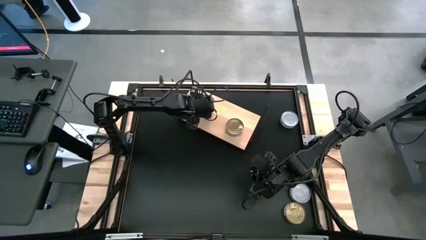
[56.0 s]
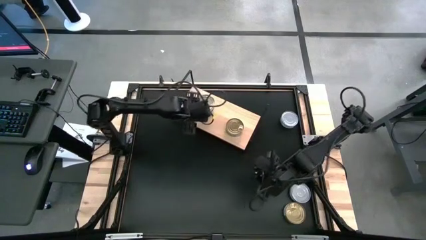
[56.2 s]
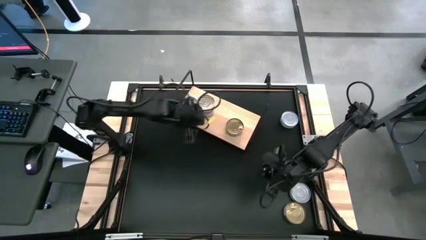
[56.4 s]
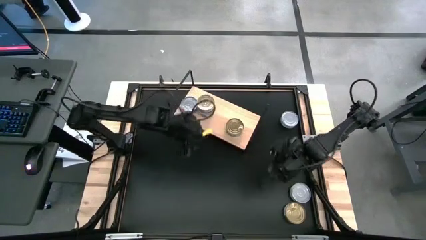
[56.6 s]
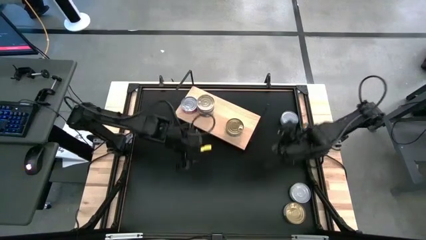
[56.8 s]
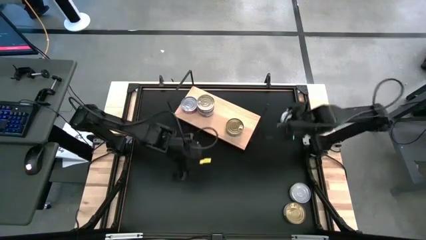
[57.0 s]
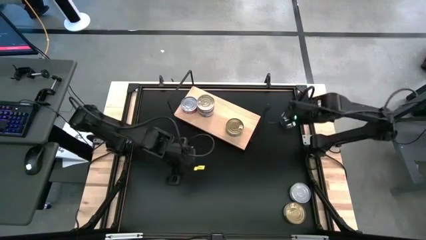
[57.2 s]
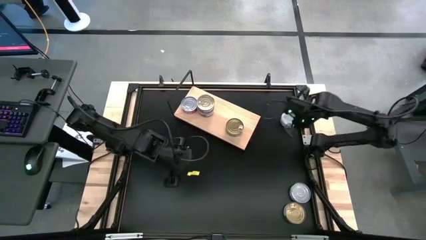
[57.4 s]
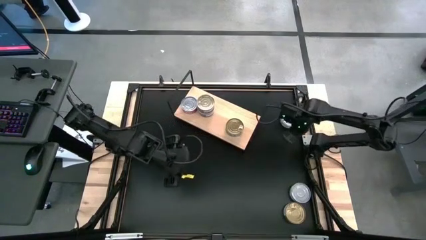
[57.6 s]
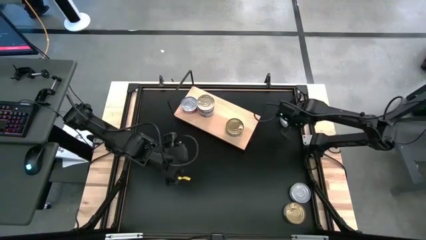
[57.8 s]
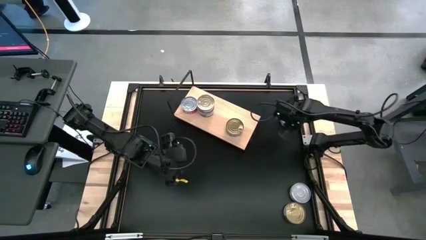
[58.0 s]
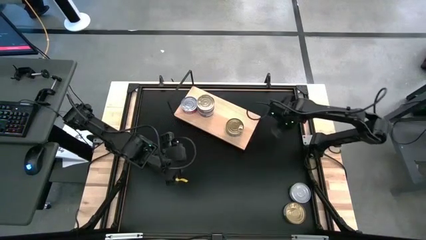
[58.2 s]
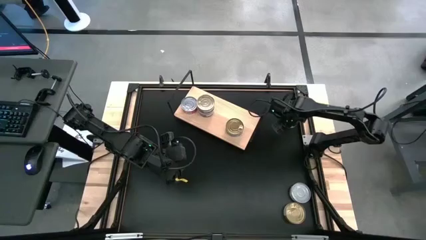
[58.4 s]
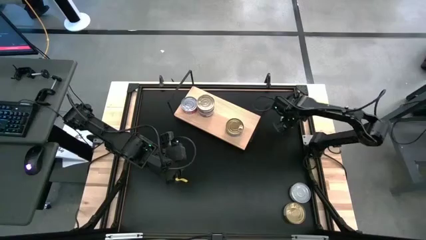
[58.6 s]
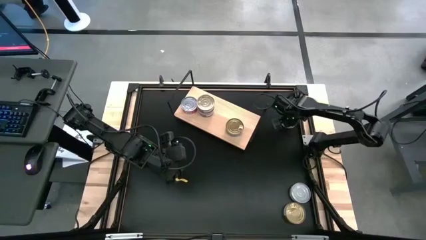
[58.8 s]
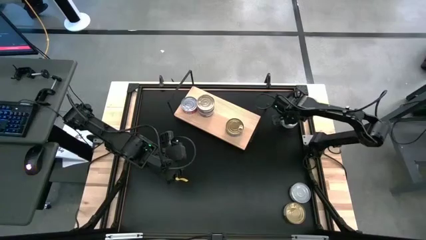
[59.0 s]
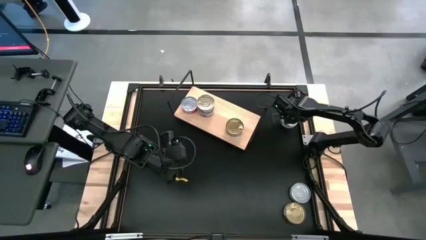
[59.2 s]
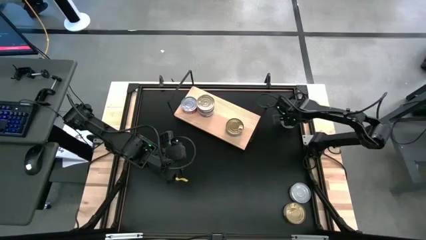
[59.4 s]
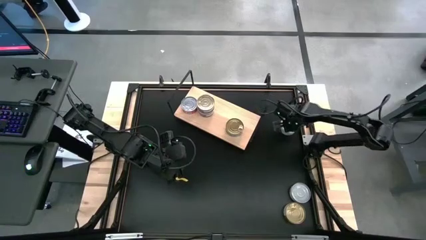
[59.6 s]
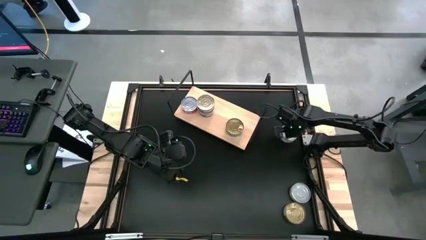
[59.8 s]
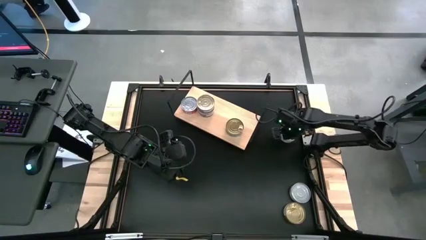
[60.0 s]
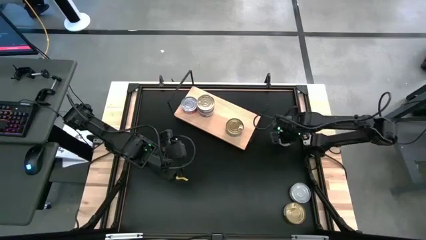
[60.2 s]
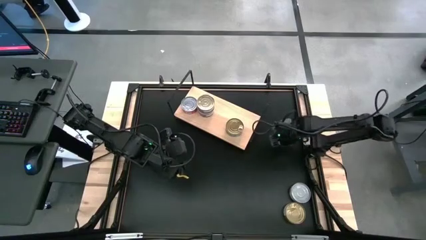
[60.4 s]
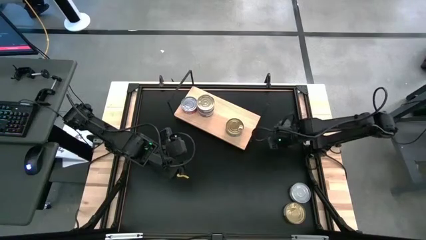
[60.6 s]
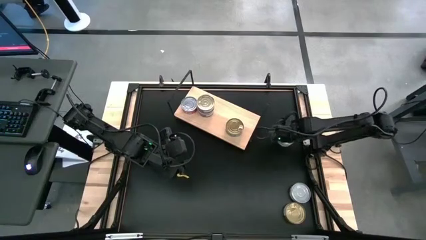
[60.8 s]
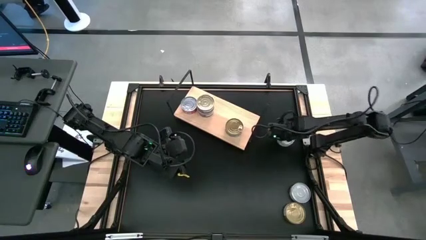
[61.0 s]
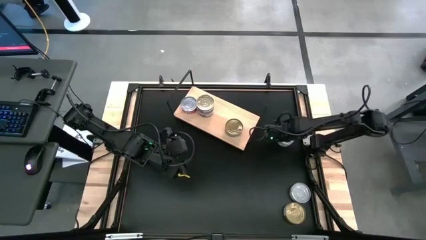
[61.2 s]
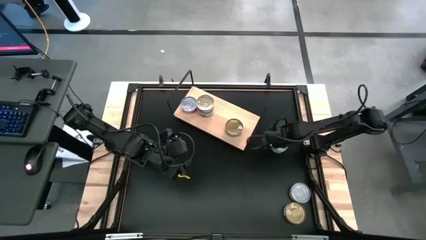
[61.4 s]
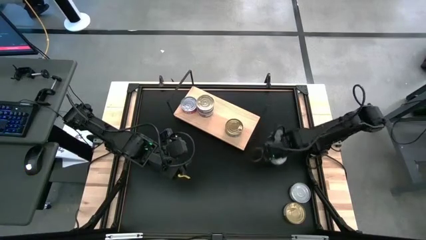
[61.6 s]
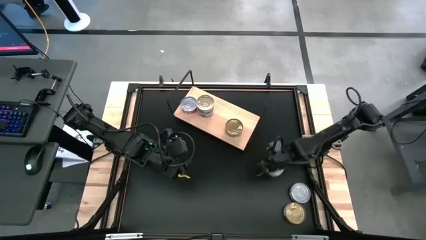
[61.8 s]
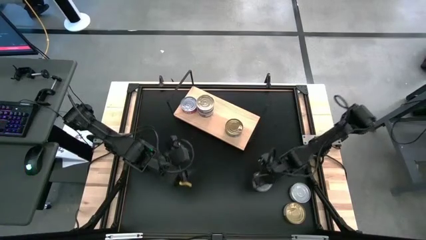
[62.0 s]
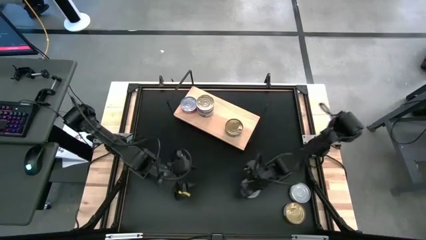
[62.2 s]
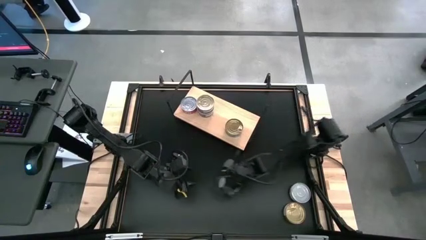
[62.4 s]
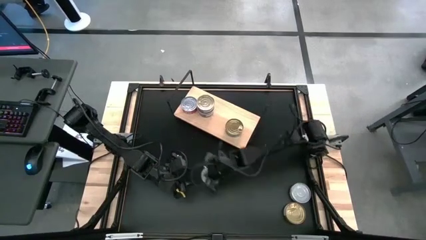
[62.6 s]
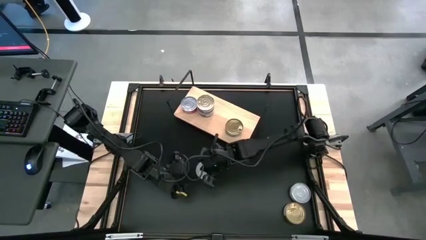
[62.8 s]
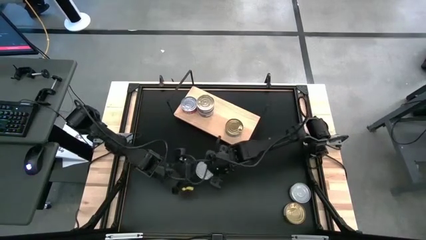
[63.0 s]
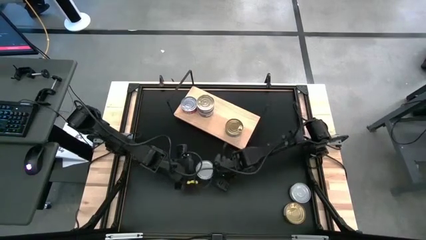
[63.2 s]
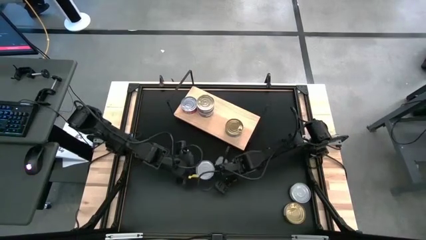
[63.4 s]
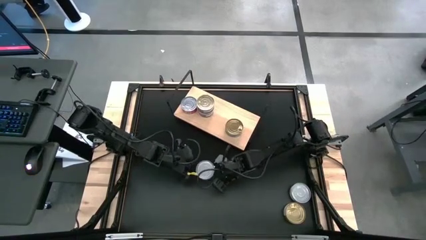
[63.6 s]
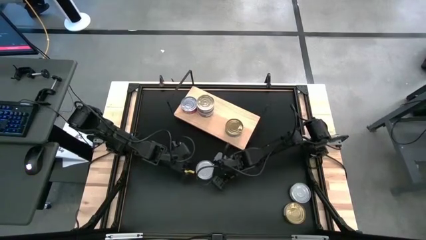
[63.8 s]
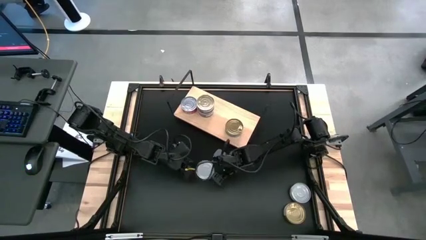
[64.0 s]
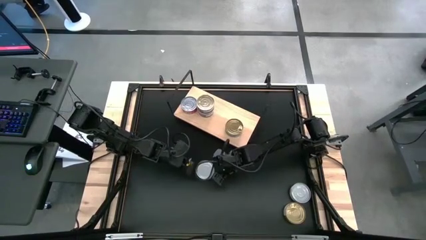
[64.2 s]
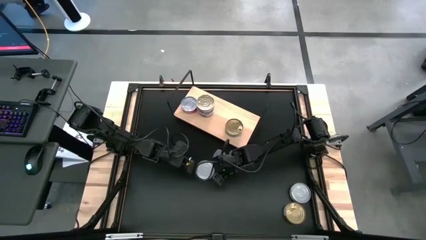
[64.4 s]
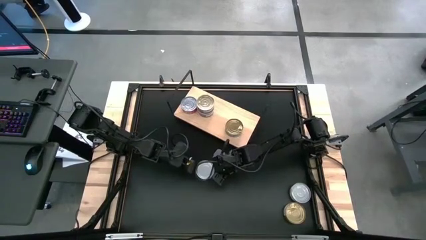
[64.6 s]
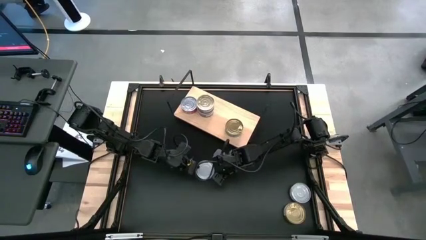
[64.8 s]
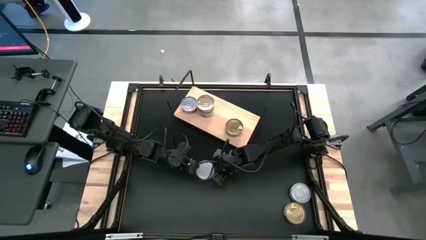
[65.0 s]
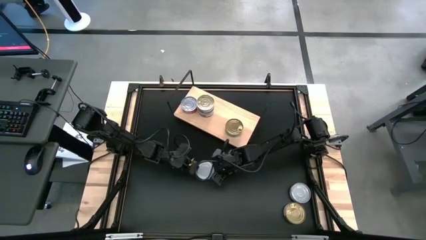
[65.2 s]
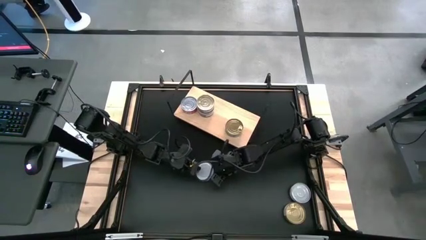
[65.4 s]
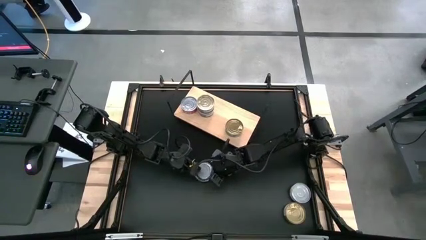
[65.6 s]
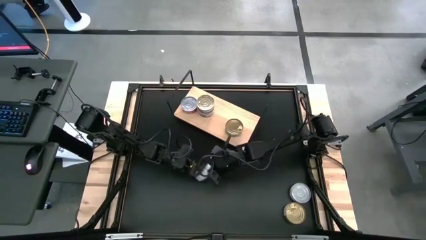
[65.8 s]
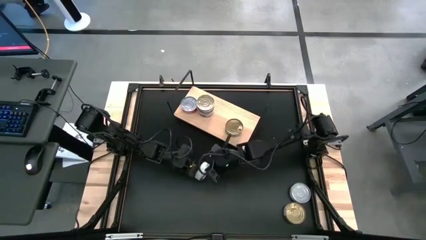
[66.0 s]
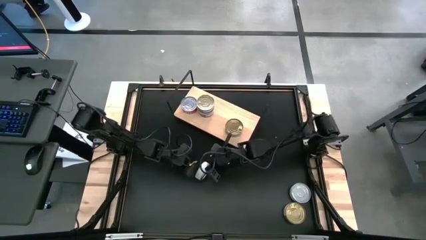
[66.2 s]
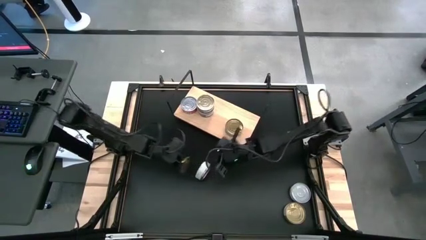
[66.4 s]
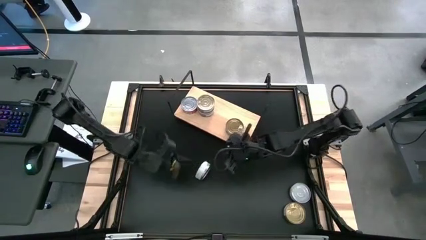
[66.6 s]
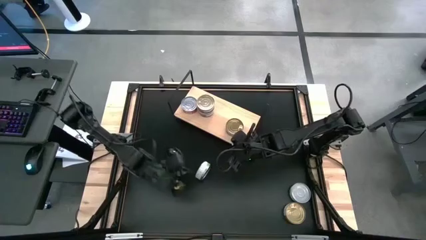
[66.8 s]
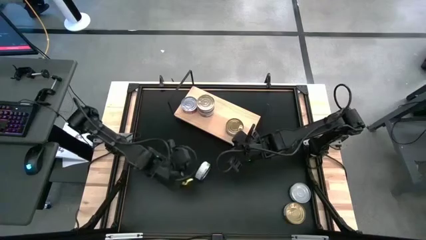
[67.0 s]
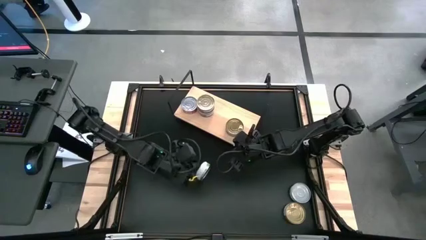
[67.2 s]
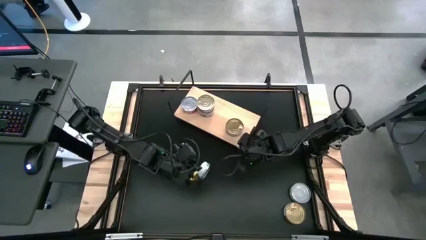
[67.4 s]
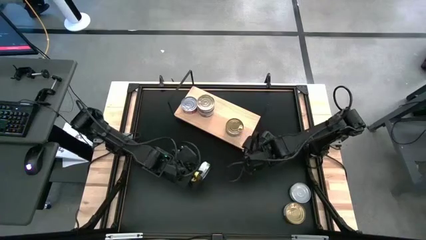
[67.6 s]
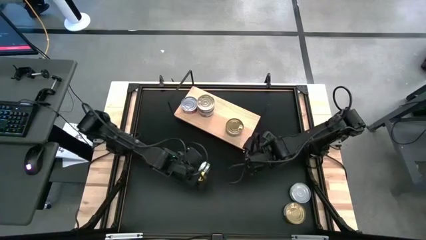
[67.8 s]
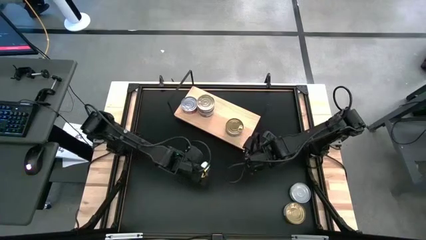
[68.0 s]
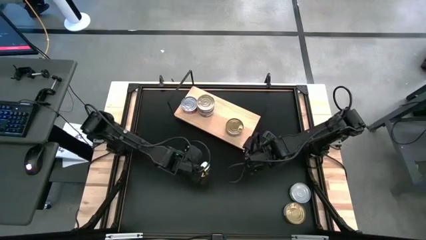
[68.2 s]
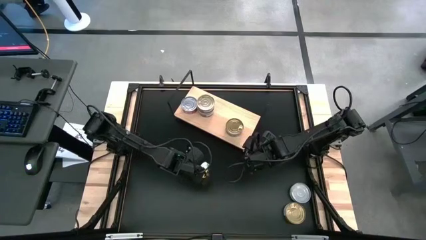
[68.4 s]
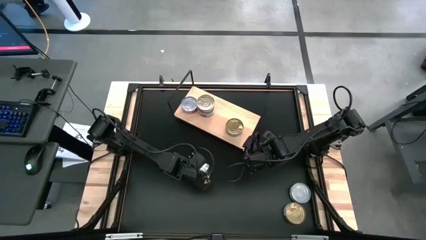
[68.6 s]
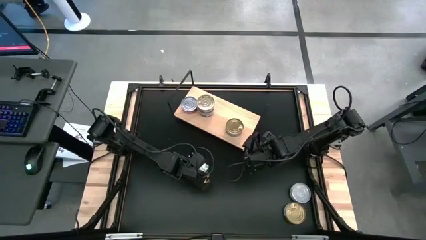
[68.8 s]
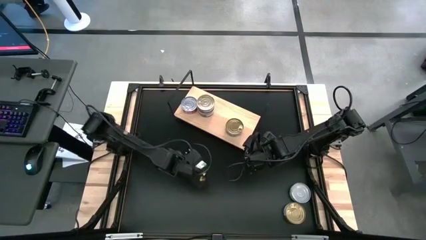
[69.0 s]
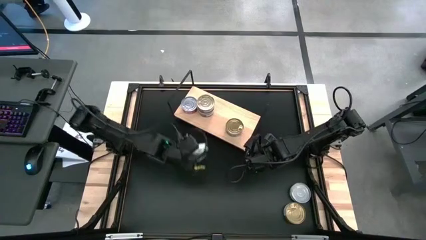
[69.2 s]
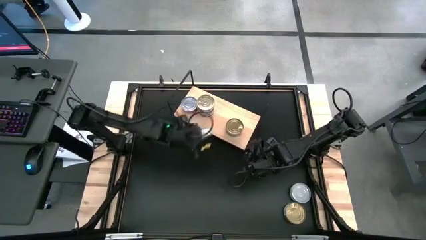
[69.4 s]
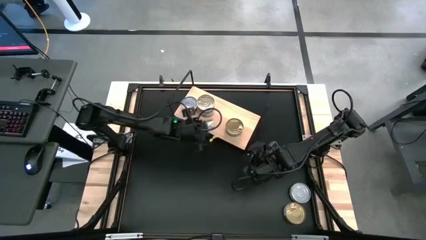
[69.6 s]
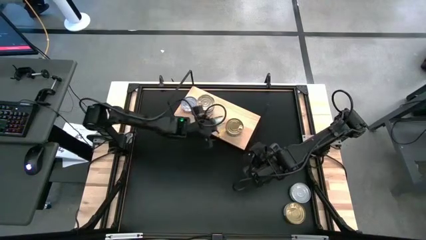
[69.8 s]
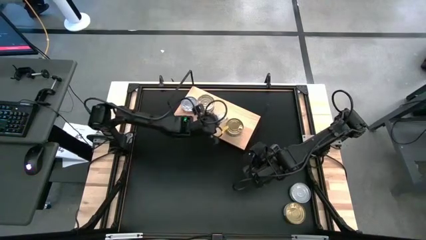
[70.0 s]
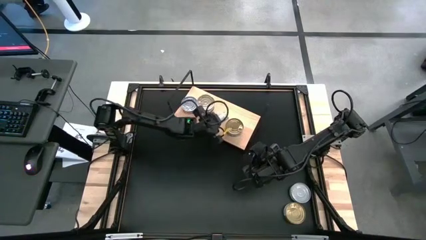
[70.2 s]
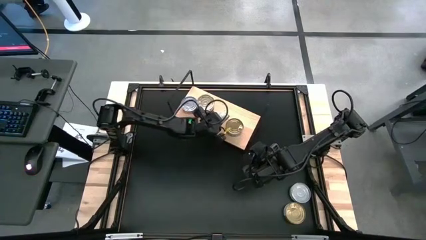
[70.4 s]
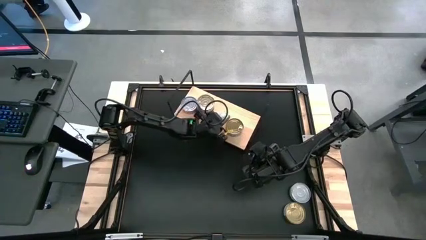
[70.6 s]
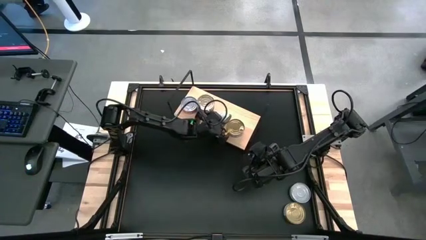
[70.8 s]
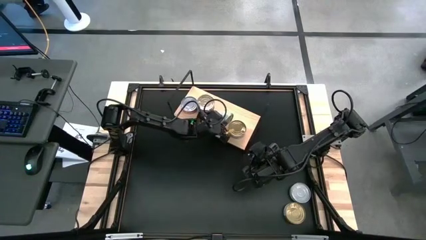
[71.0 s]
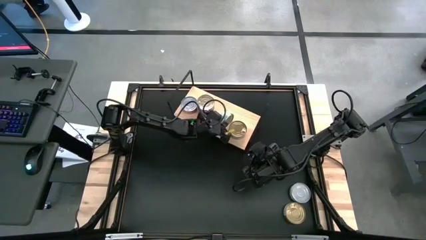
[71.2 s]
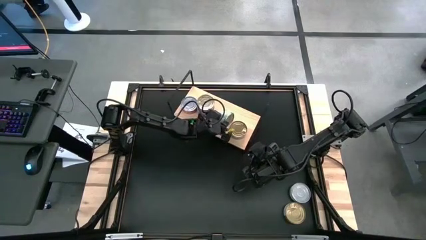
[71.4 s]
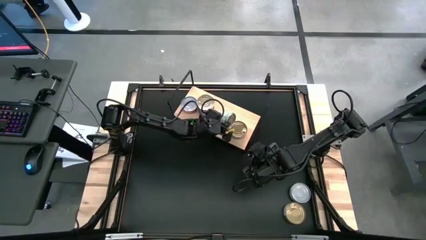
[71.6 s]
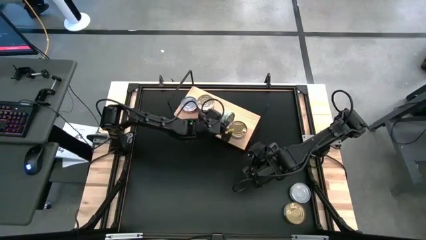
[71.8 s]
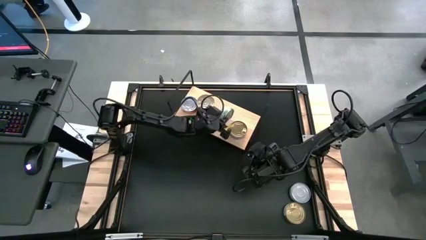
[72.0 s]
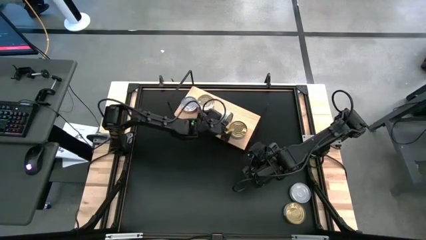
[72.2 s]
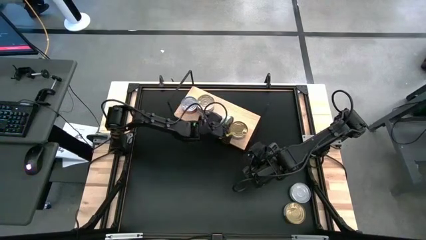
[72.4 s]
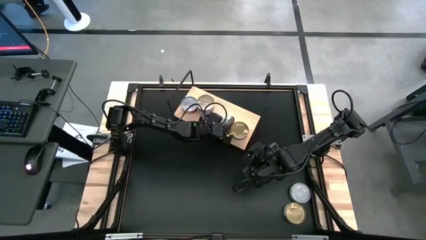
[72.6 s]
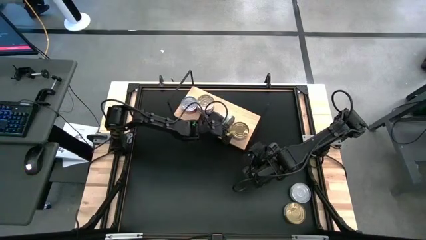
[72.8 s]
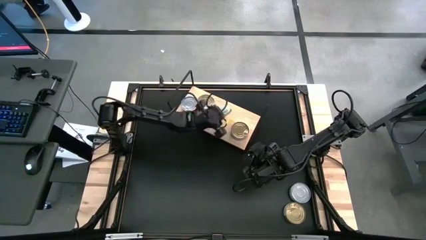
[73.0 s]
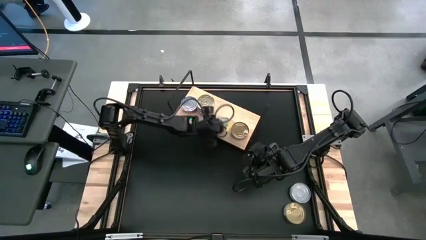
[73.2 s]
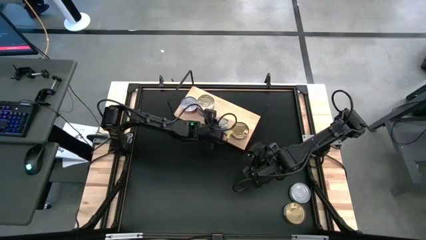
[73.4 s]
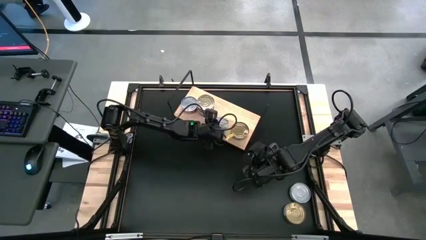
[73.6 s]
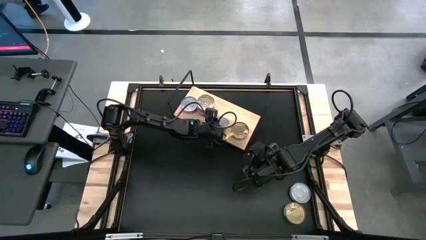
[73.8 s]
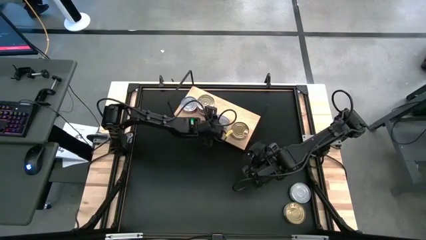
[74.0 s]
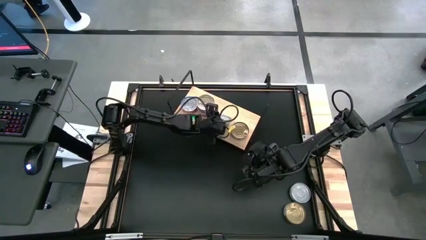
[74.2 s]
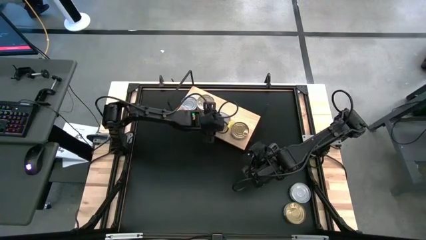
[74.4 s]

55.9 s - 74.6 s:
Task: Stack canned seafood by type on shelf
Put the top green tuna can on the shelf
